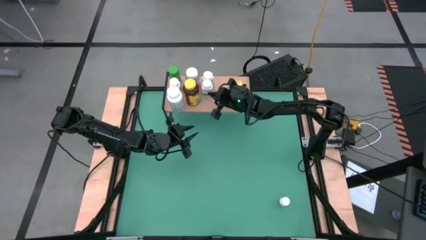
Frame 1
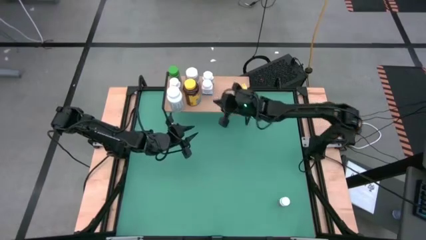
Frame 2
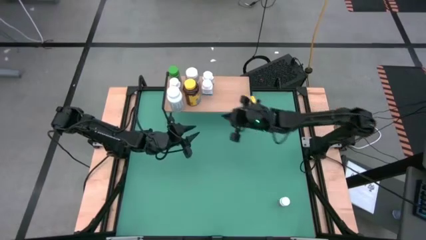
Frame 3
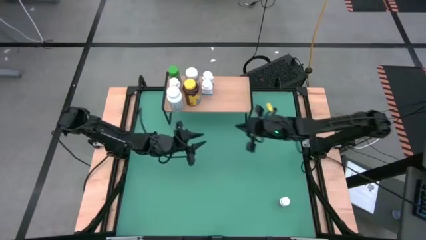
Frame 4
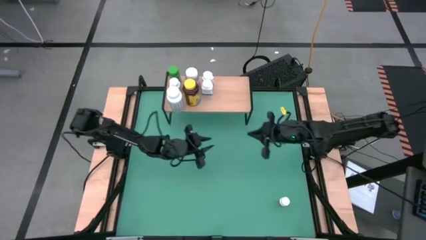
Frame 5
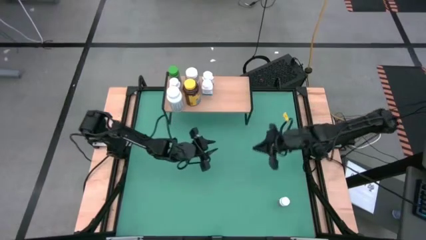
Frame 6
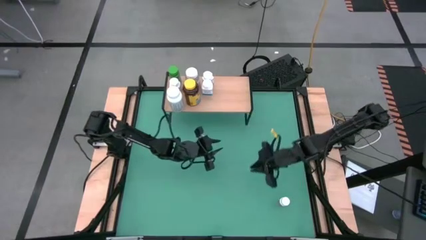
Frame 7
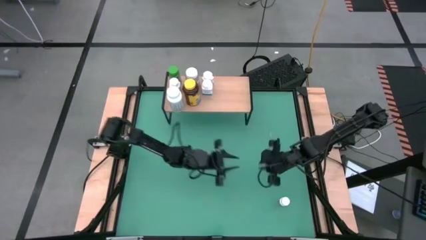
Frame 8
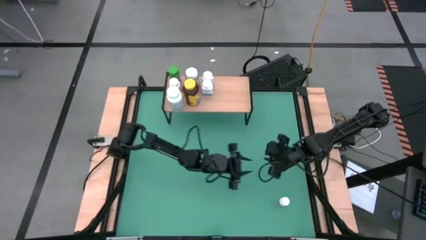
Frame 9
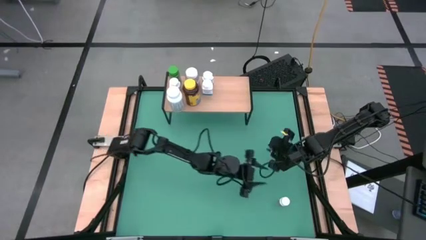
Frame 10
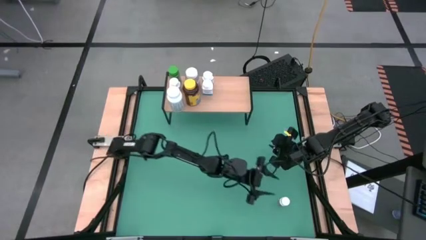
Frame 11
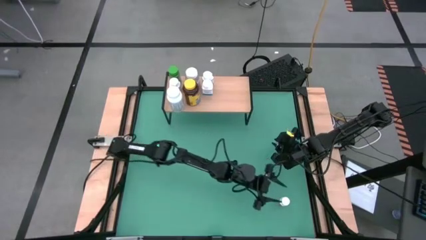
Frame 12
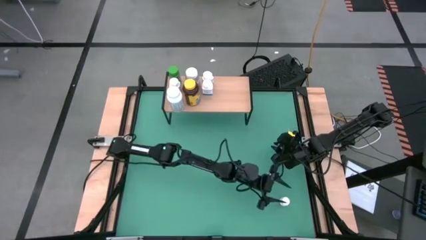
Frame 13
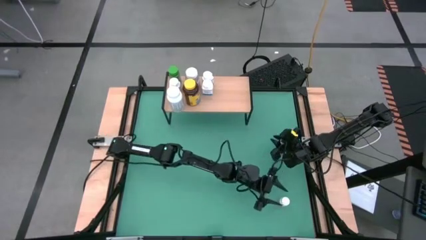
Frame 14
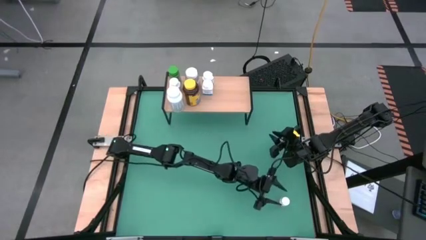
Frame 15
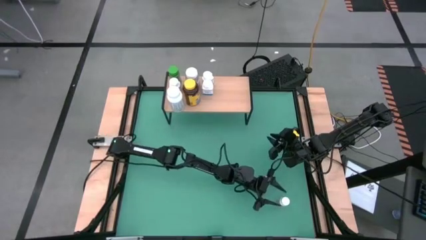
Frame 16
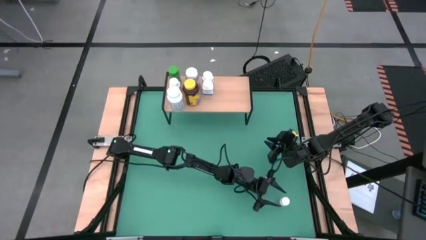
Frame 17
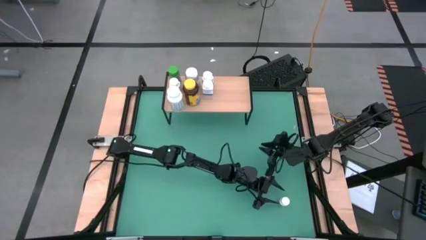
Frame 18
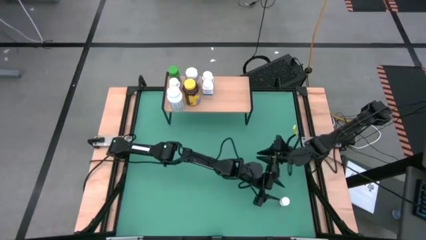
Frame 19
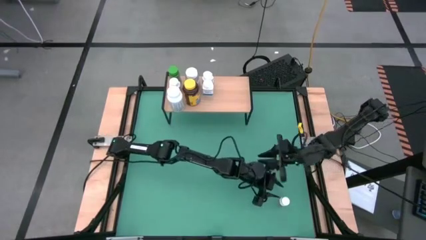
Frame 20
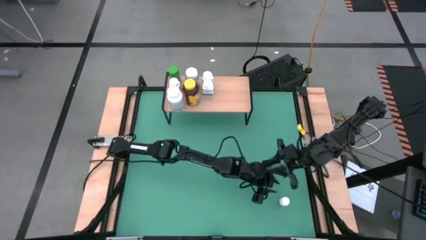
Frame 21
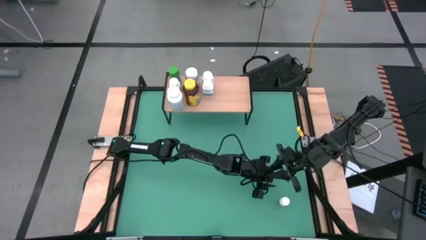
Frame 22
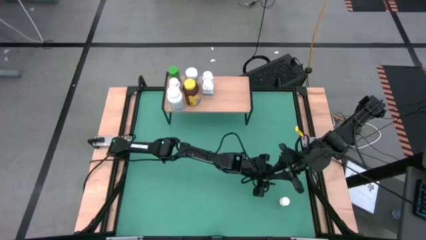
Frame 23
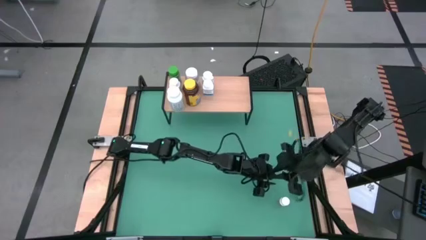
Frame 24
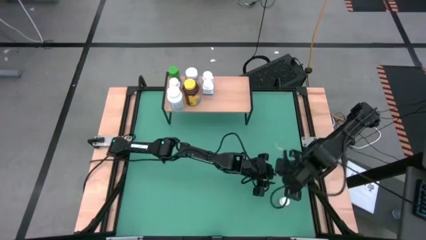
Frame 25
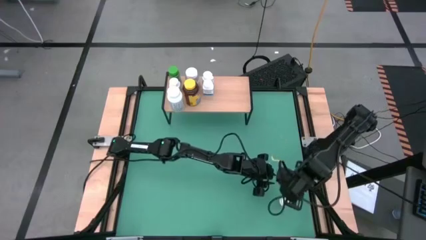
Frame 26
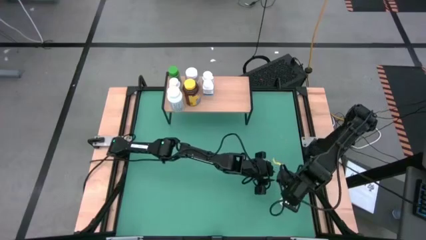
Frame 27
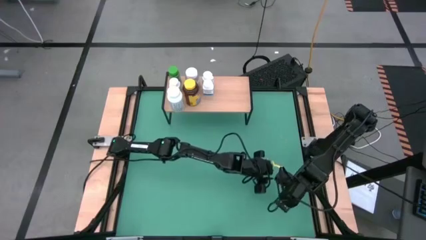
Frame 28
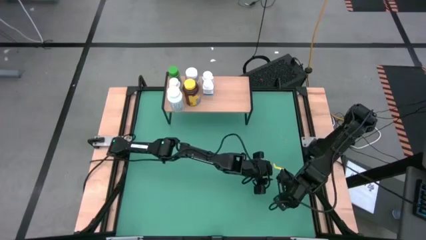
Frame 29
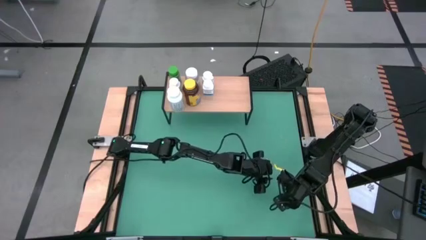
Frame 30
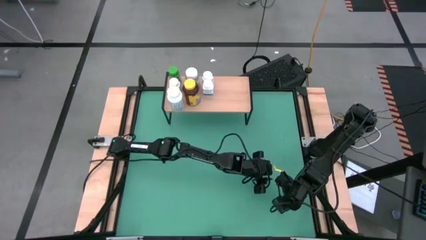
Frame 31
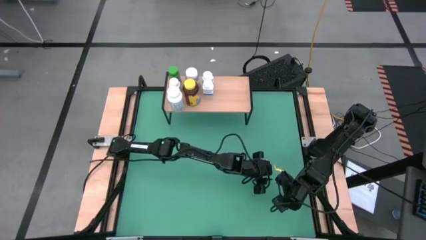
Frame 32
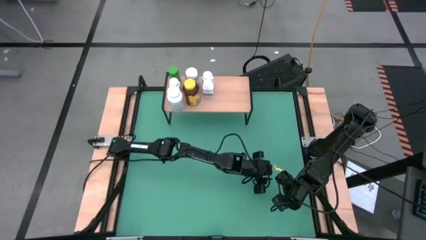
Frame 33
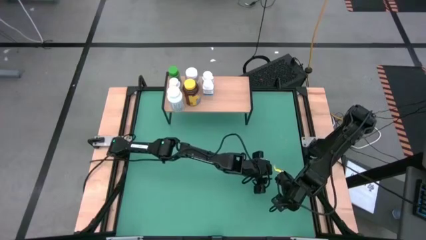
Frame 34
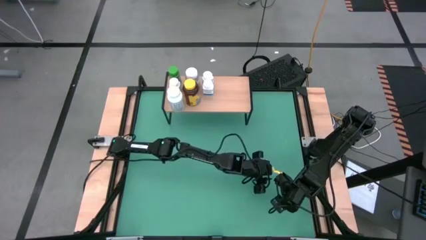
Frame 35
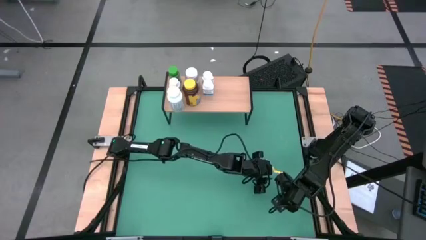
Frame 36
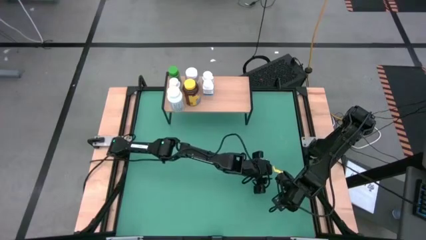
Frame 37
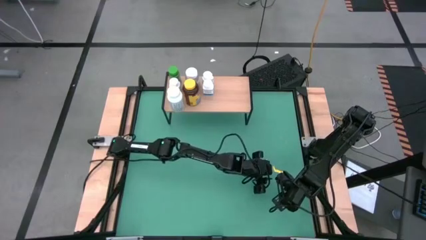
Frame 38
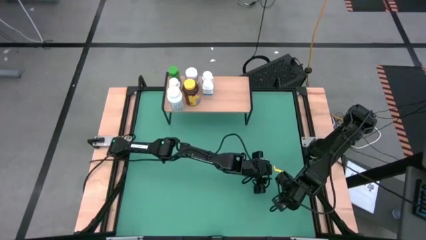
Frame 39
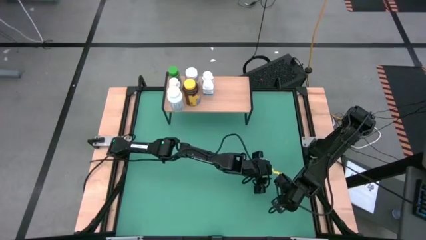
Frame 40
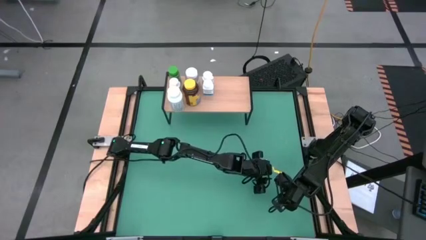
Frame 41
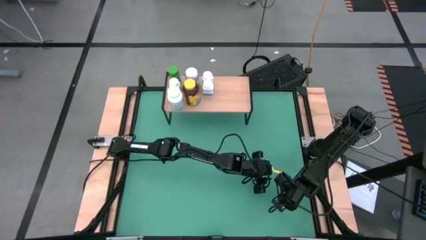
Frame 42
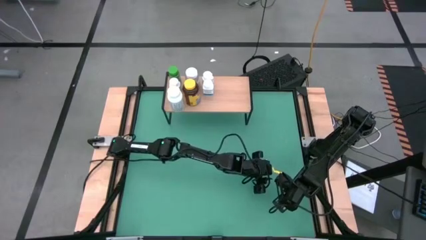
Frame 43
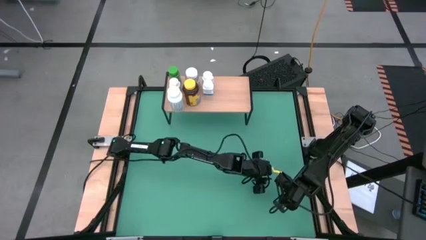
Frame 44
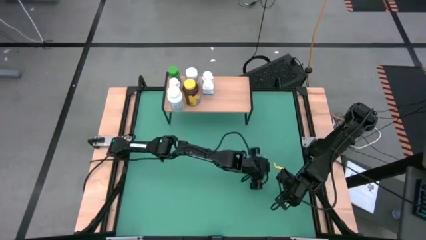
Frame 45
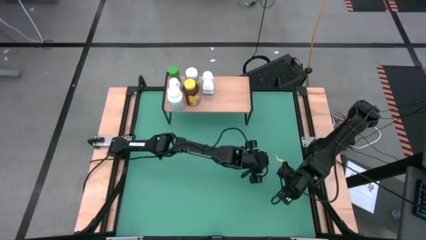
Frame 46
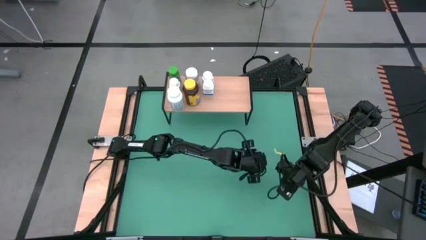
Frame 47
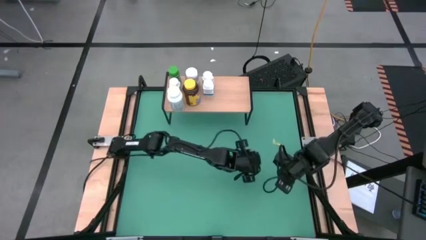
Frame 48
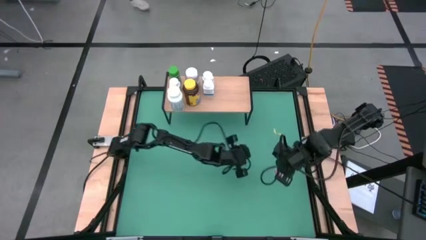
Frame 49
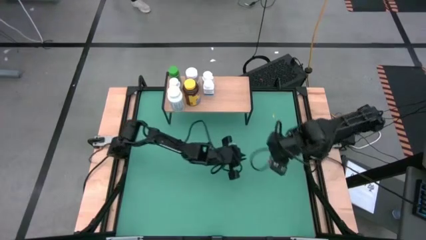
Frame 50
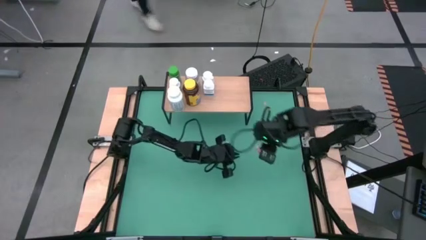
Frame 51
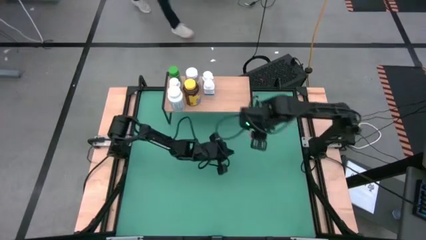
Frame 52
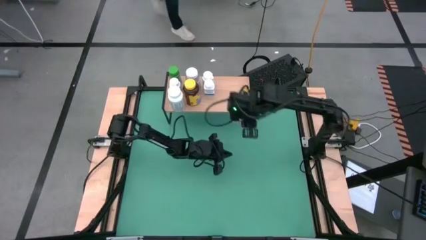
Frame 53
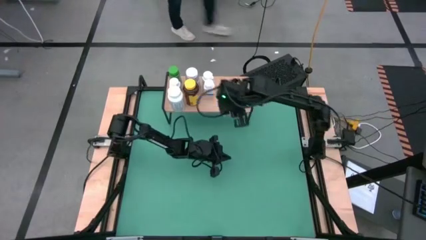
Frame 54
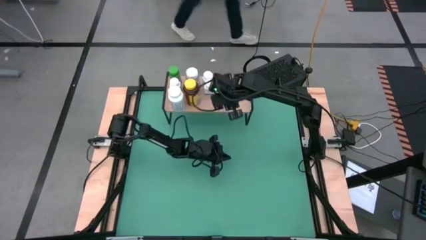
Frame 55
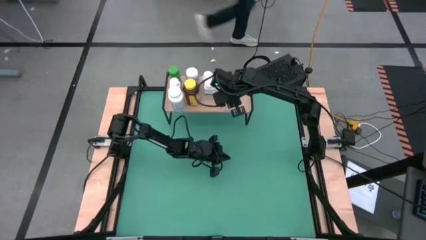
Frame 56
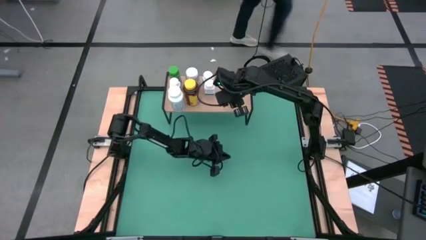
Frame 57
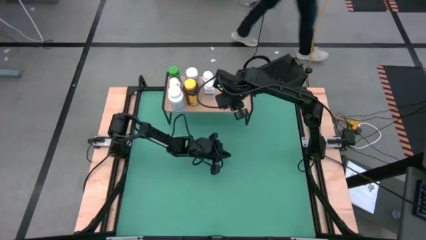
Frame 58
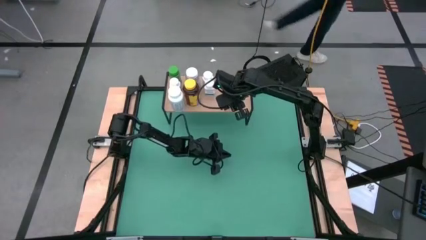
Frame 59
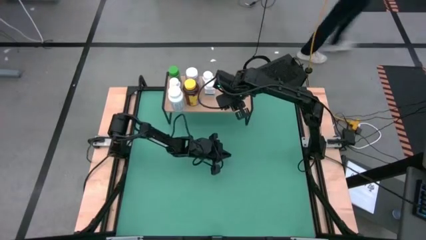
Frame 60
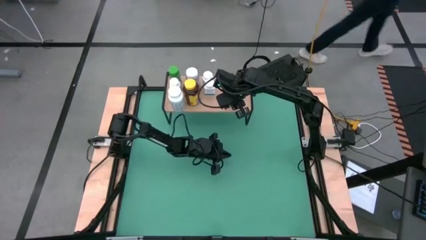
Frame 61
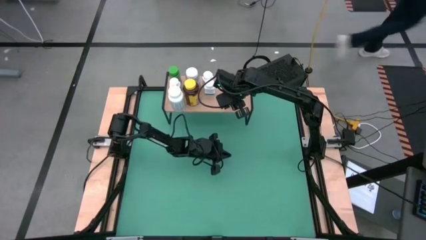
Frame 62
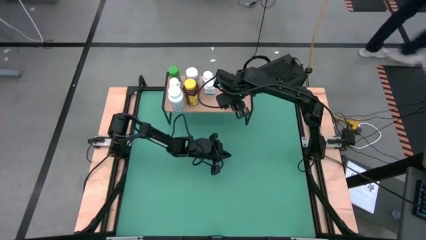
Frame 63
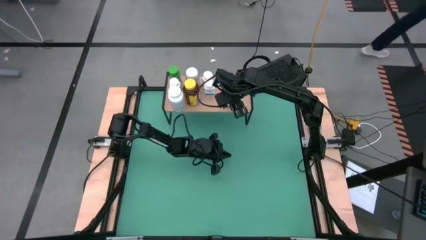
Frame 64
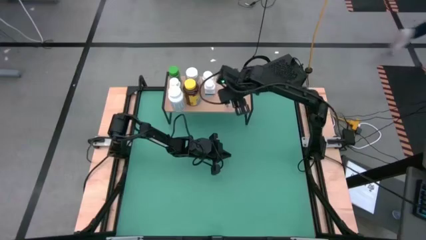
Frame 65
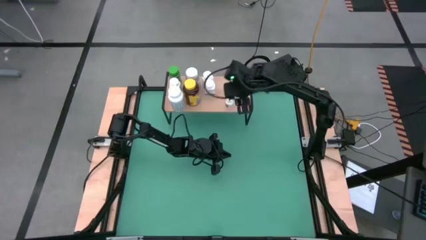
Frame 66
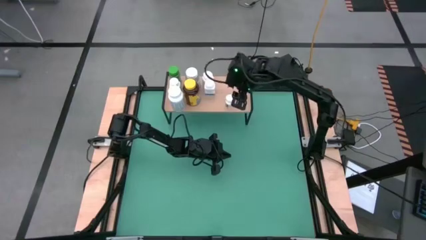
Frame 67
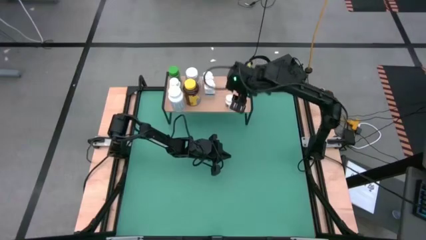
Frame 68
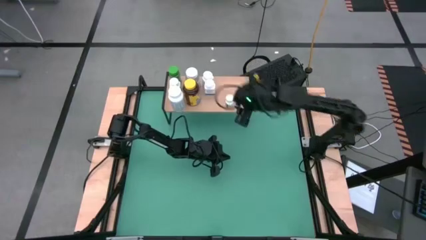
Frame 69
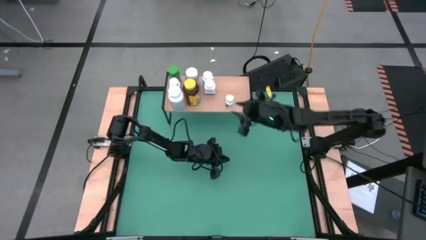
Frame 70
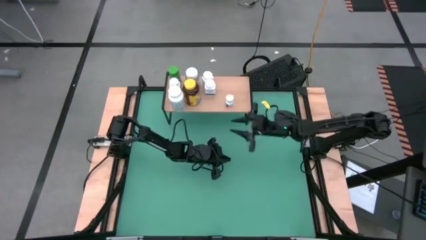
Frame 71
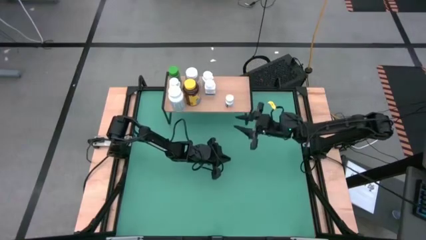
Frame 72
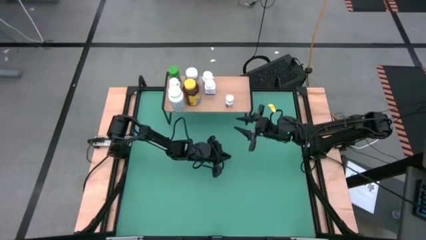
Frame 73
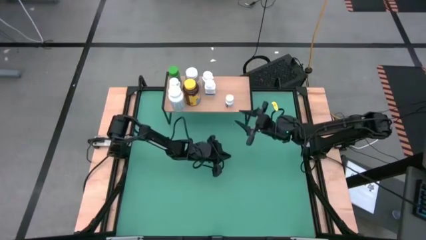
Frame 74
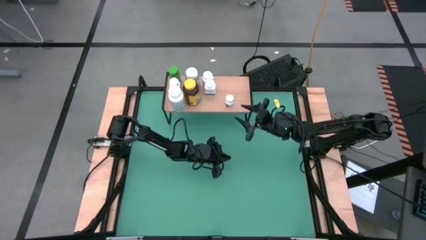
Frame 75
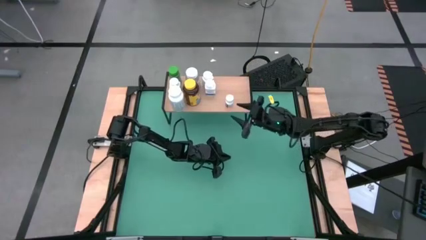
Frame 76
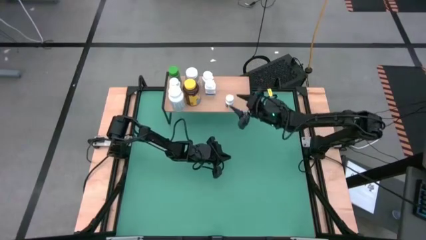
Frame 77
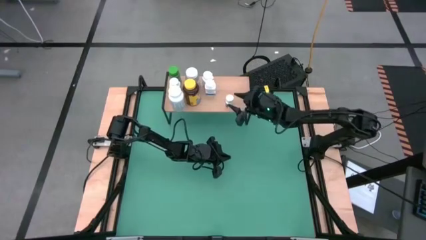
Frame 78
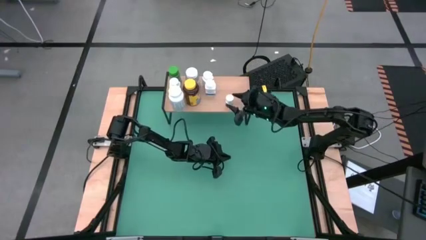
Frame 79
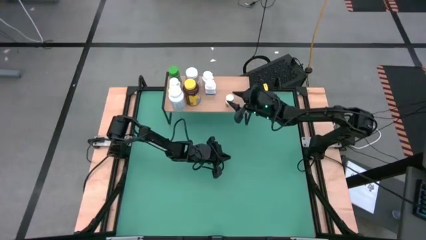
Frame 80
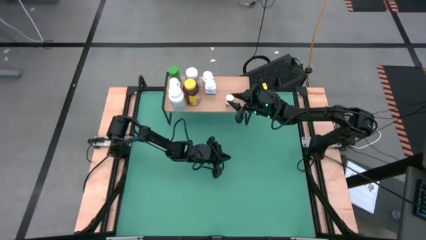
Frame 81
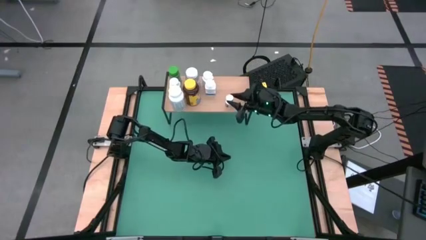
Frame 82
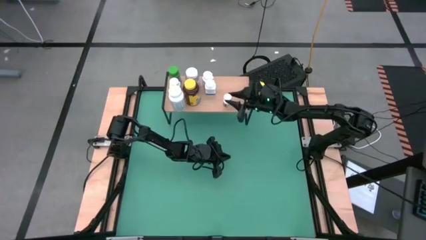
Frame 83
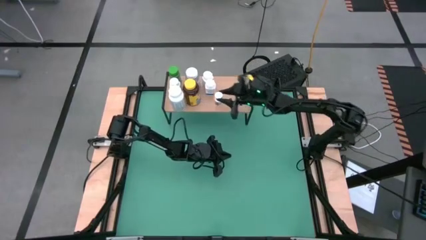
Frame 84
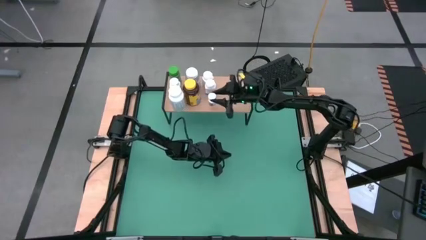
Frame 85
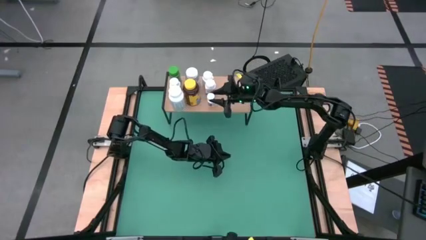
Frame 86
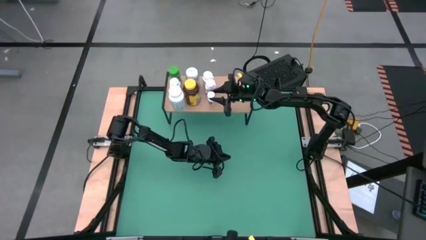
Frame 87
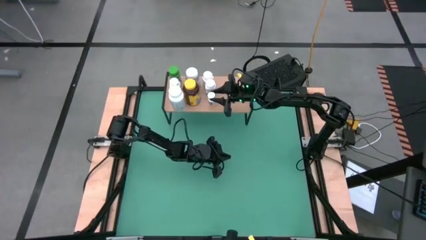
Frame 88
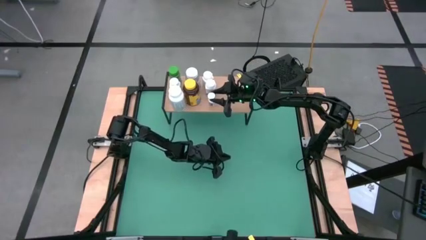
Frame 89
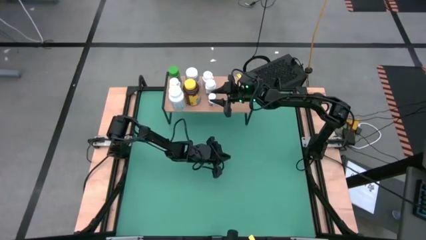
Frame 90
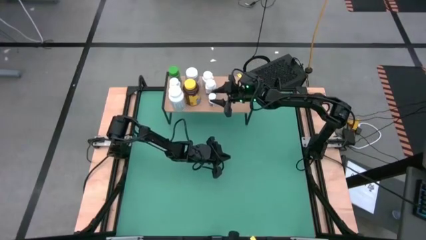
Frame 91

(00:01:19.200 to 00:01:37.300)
Task: Pick and place medicine bottles onto shelf by color
Put the white supplement bottle on the shelf
